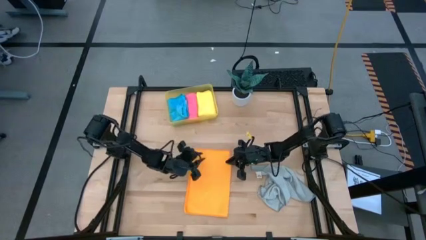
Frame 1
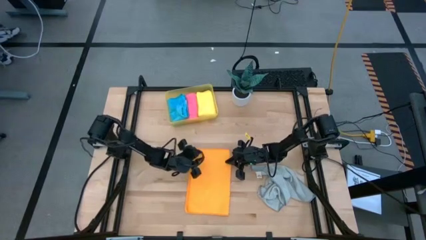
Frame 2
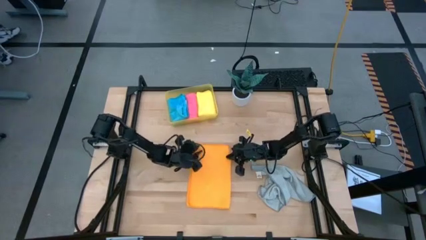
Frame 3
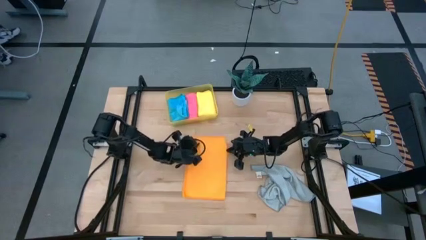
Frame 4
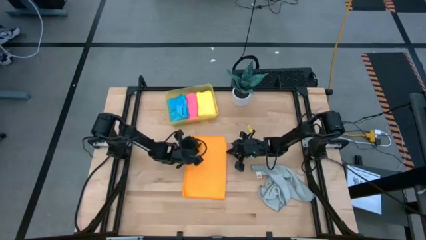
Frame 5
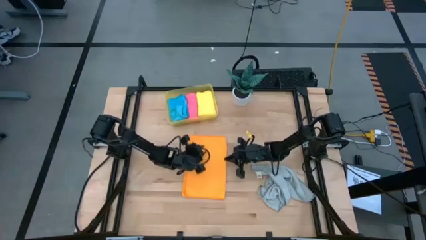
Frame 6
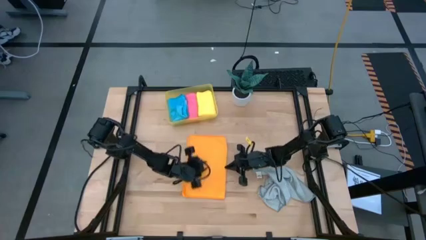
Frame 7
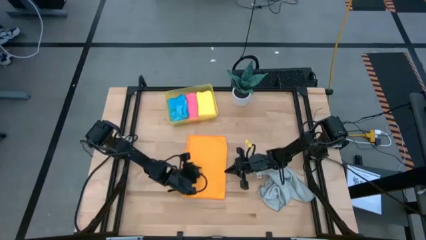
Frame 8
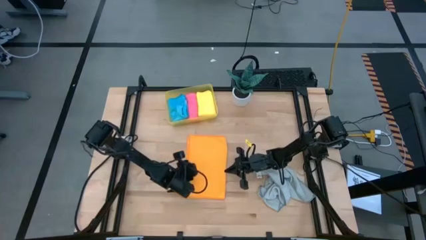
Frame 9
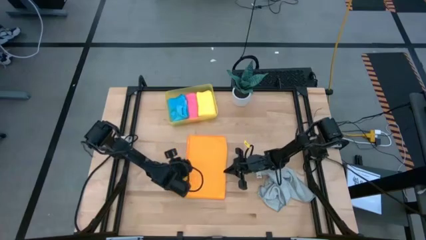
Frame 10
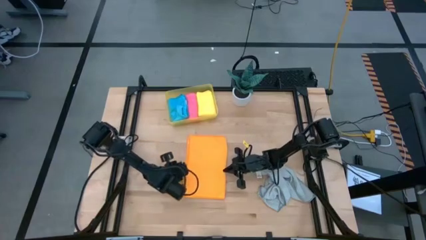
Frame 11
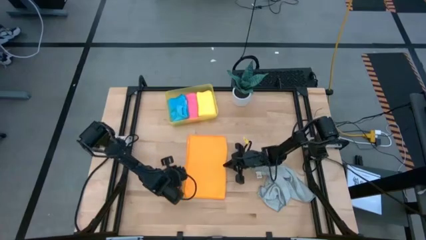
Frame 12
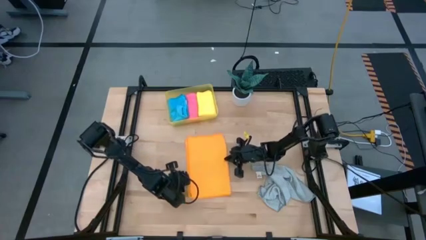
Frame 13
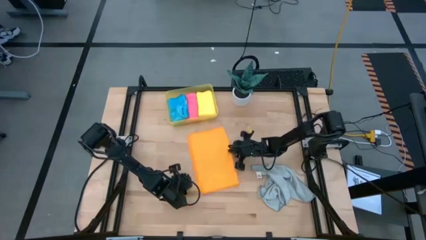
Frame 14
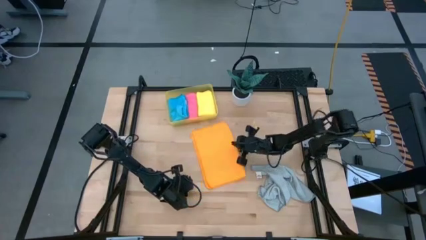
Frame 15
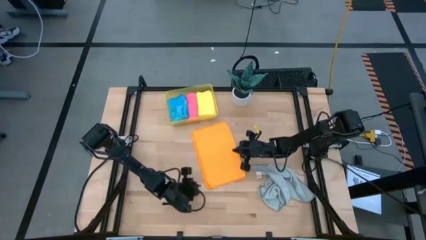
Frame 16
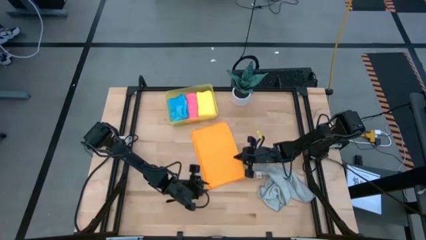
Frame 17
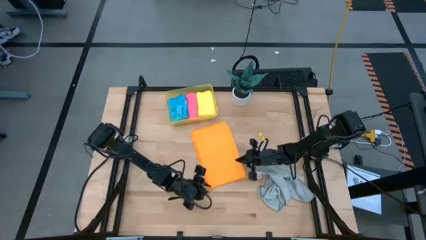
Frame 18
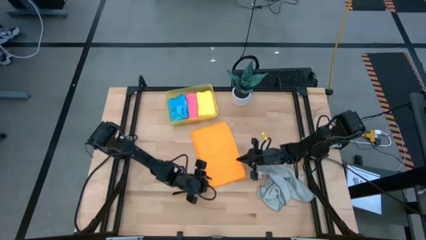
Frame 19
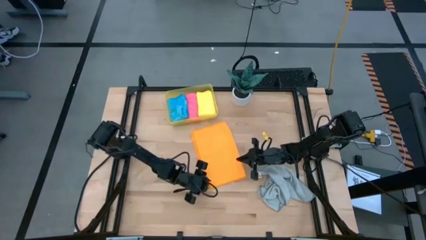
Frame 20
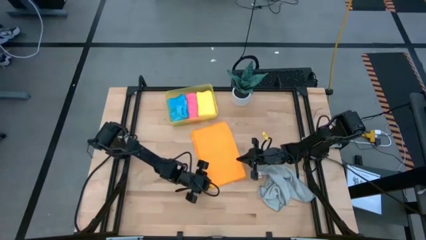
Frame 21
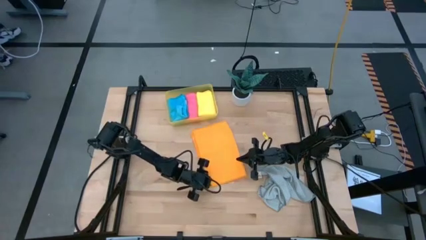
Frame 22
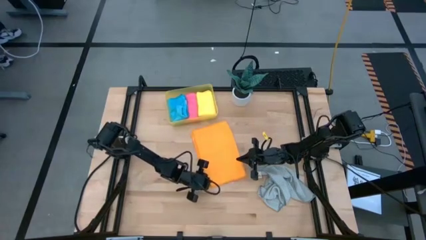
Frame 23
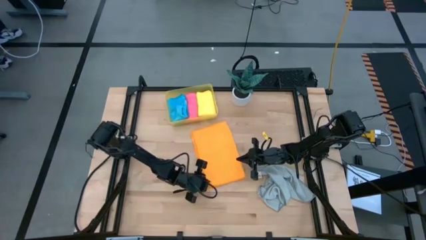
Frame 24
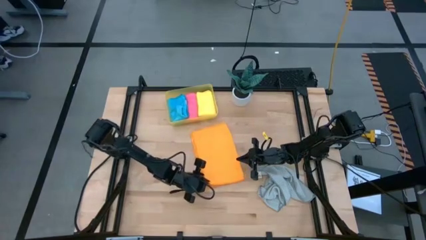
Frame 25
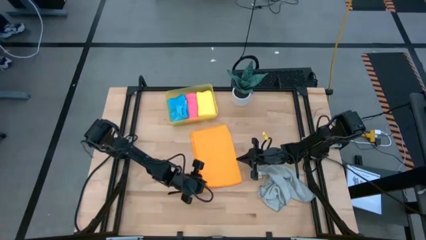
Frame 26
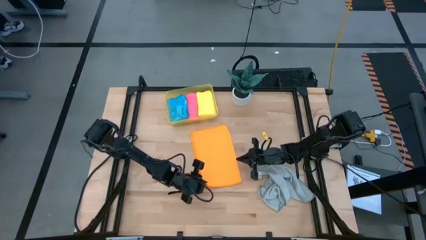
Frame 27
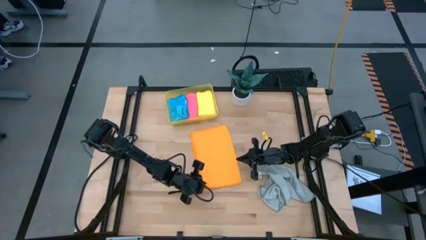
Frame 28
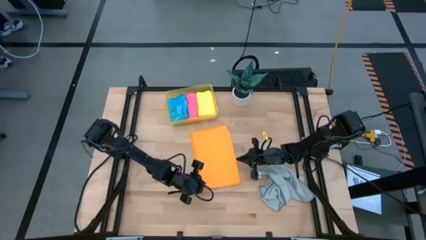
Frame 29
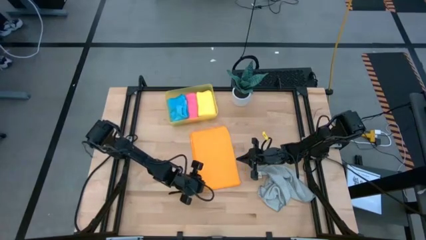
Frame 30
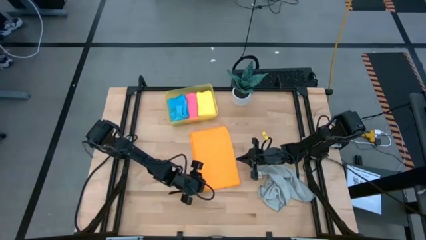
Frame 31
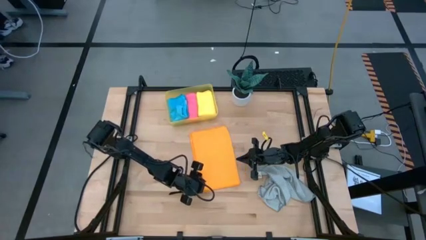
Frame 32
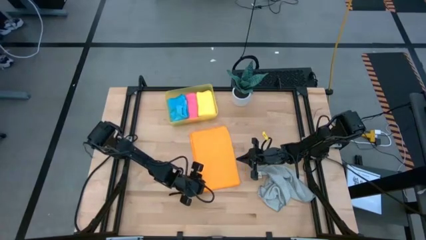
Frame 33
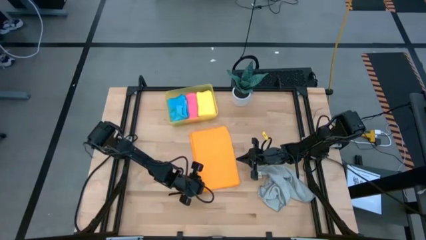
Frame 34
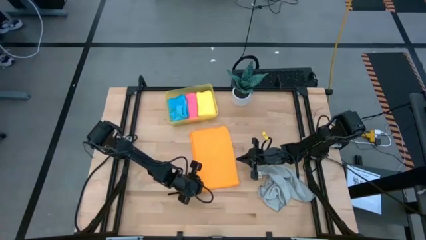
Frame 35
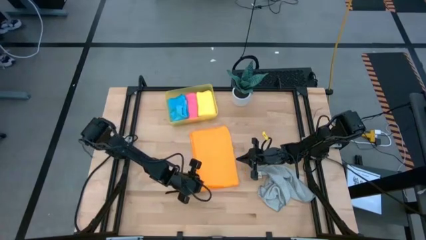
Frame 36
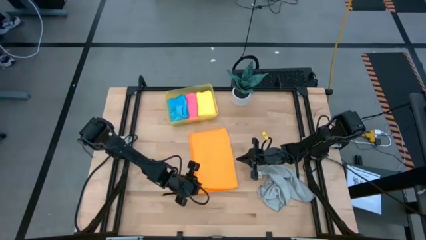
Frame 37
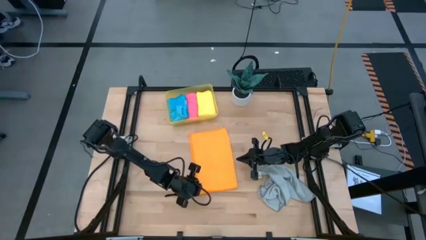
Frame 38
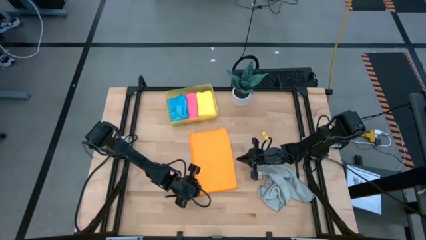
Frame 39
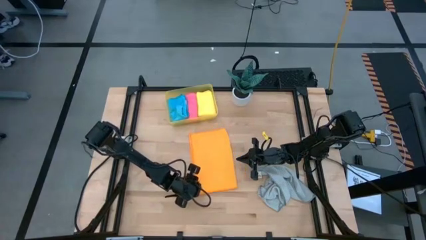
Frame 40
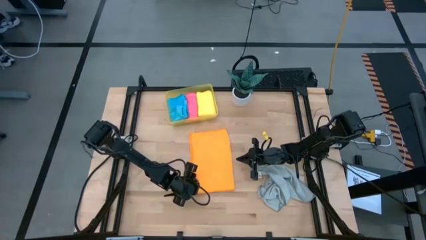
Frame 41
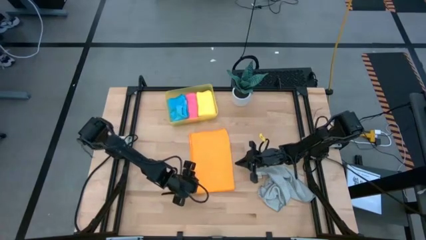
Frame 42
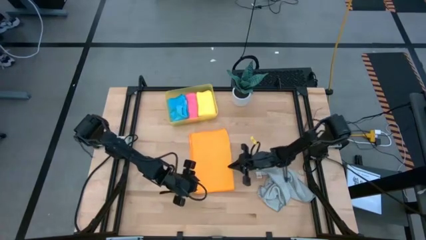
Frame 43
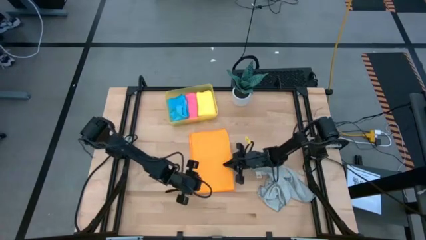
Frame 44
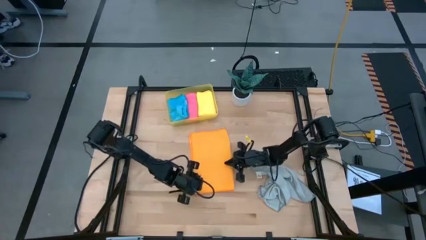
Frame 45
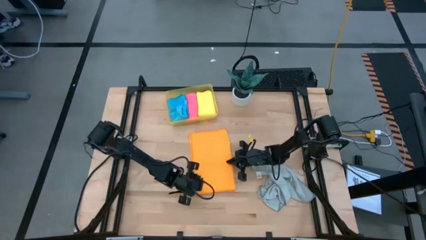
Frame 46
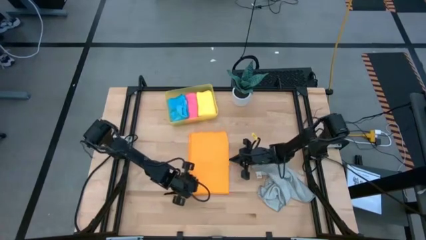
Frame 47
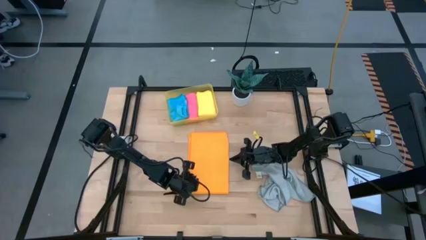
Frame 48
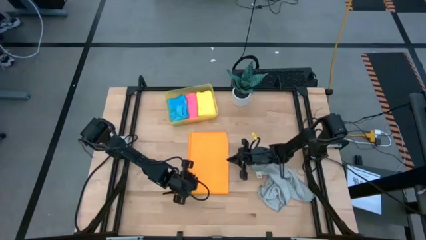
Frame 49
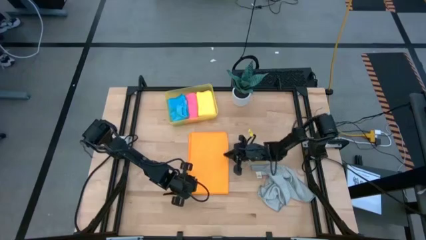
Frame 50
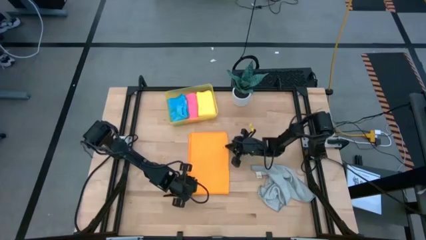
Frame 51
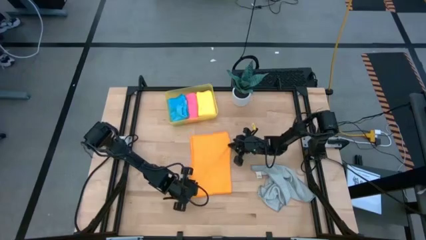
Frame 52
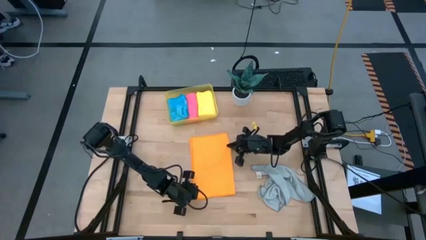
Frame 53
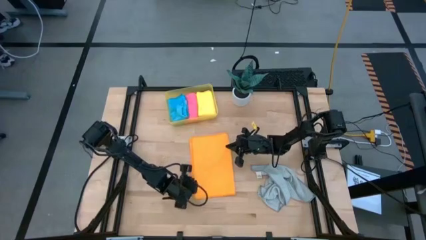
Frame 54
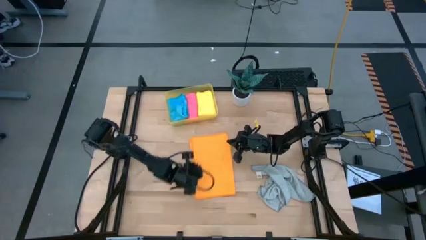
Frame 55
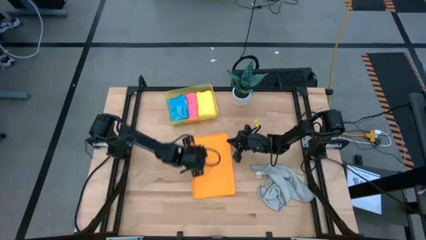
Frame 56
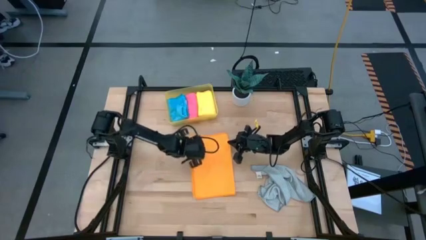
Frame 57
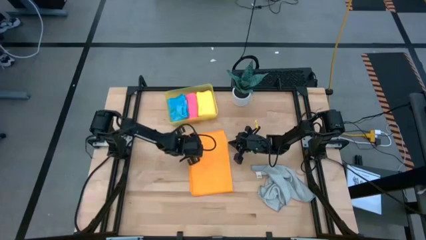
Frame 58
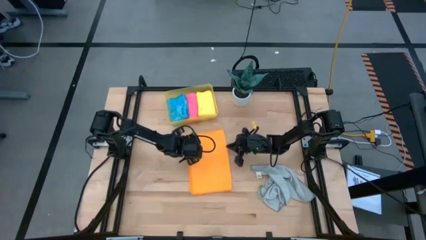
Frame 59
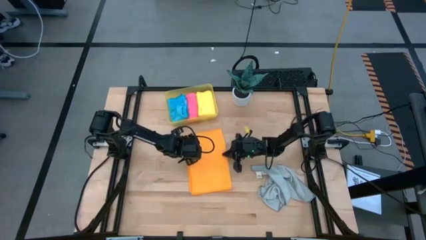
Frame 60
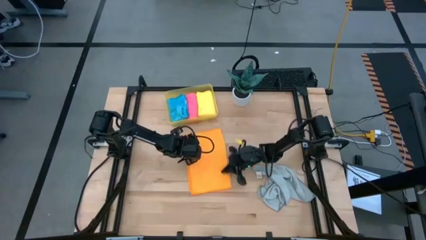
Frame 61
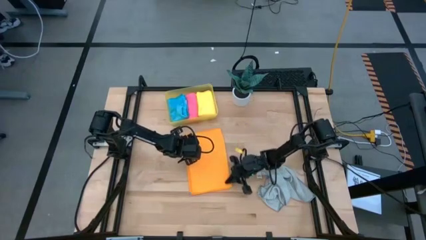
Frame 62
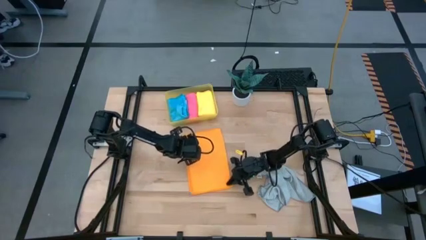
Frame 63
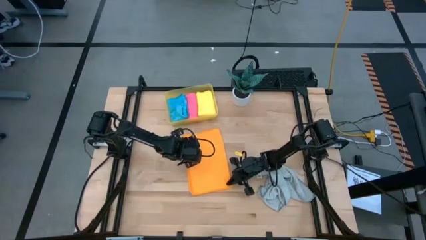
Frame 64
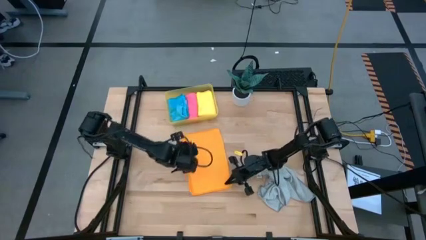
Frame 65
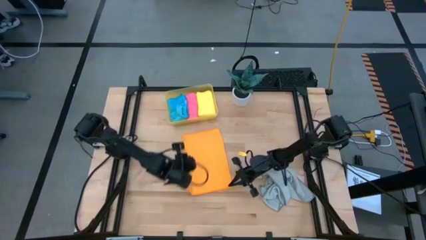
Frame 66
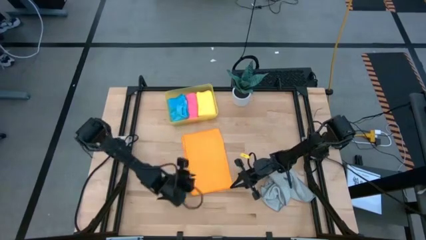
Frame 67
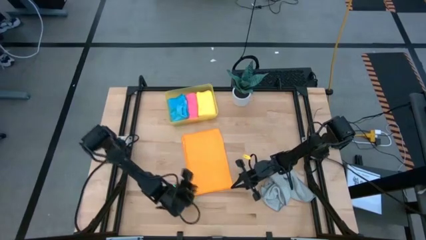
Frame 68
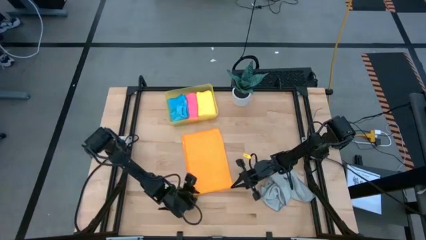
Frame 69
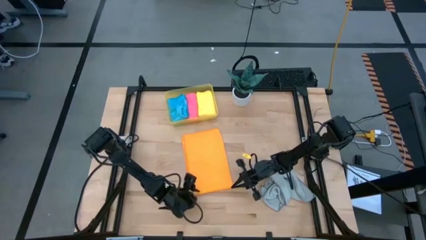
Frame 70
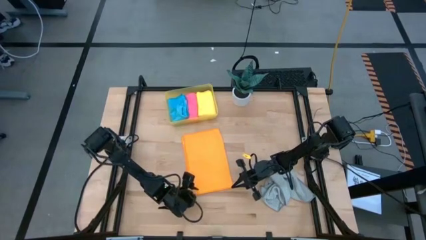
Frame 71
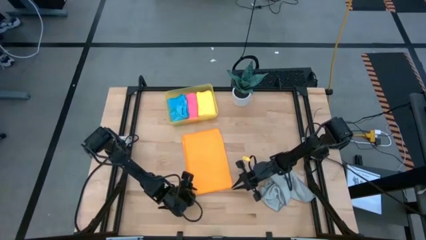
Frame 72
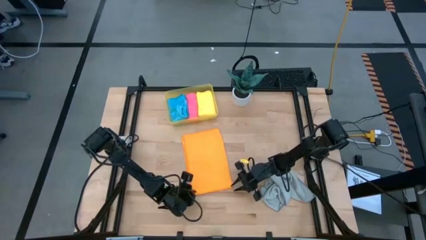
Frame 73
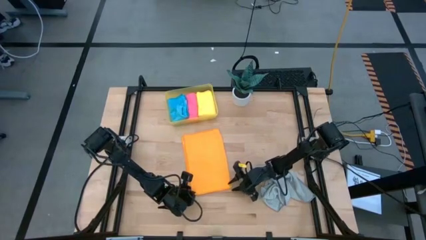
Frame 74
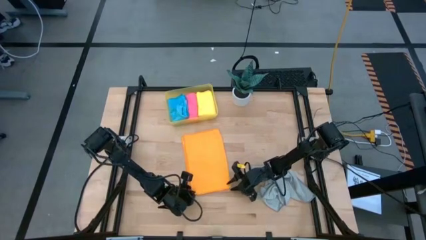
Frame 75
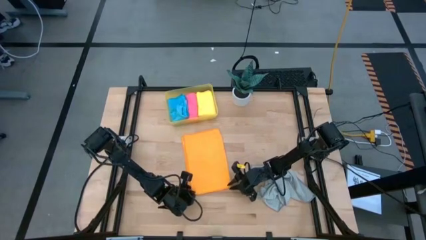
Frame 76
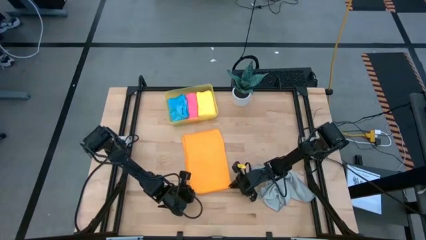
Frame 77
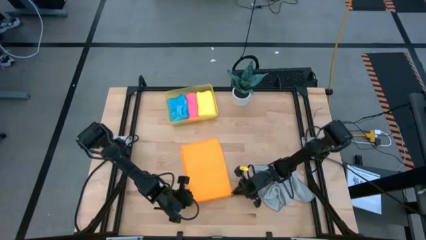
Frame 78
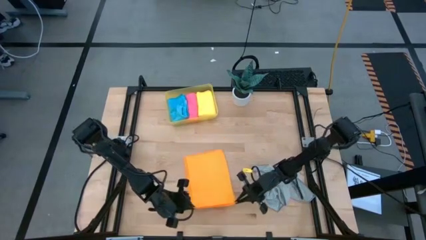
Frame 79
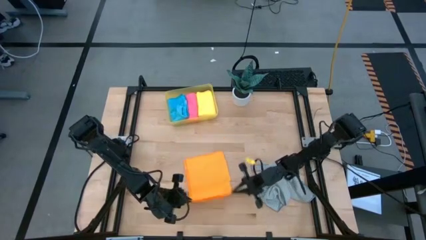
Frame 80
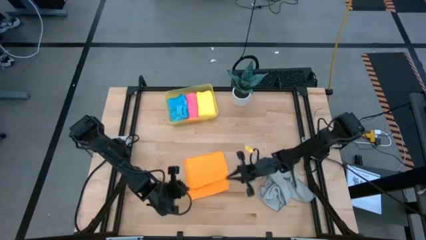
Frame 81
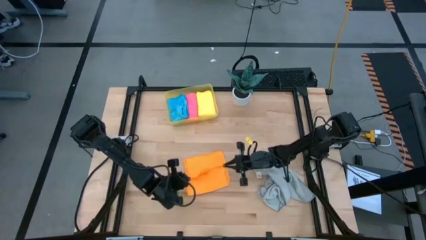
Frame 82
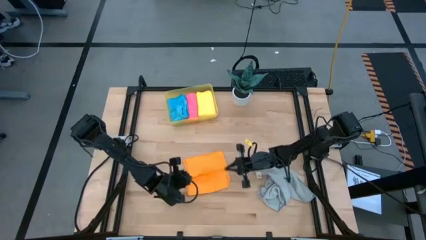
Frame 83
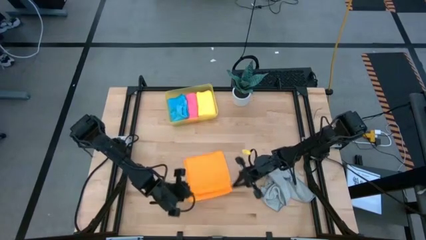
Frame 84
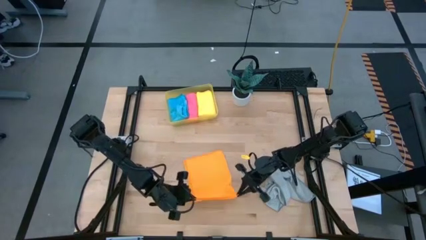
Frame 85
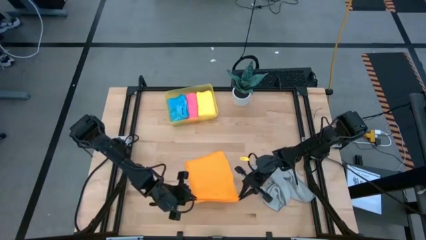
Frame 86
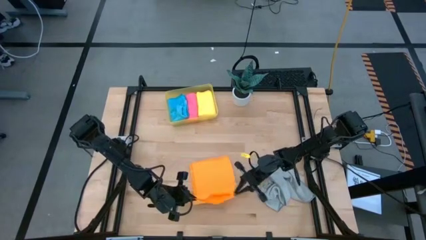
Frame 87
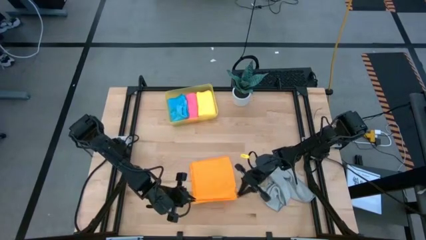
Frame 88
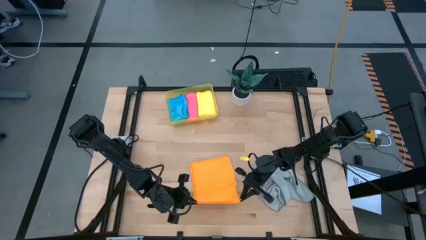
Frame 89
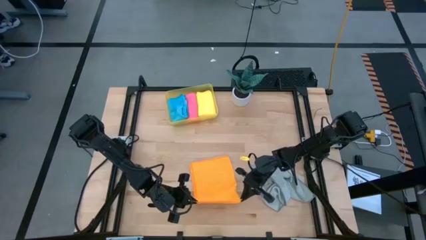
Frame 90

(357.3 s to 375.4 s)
Task: Fold microfiber towels
Fold the orange microfiber cloth
